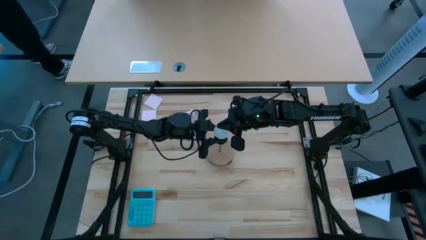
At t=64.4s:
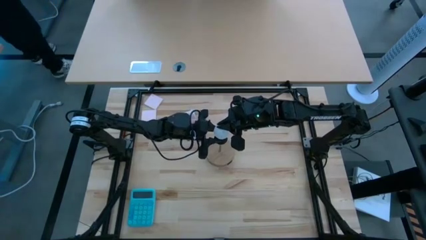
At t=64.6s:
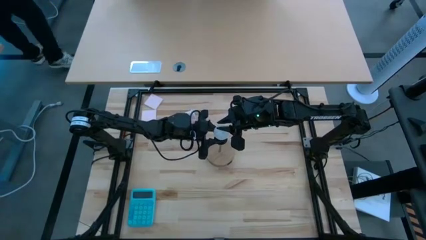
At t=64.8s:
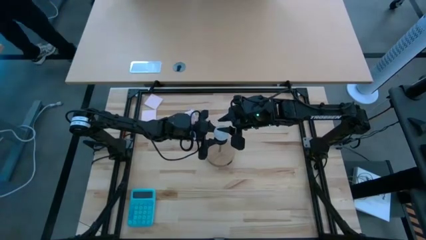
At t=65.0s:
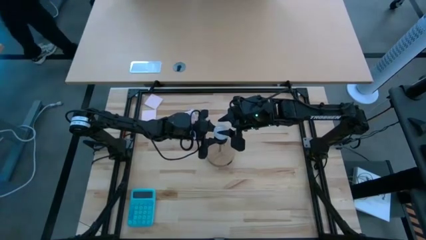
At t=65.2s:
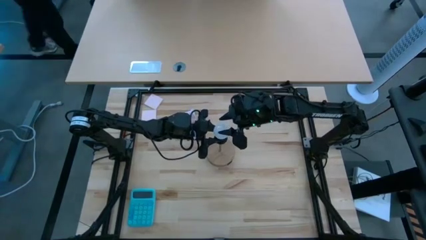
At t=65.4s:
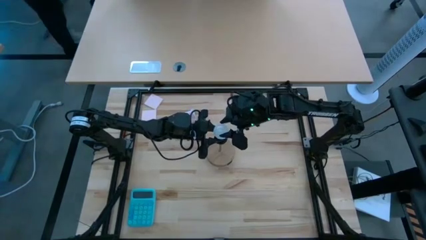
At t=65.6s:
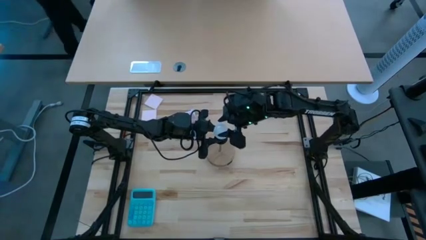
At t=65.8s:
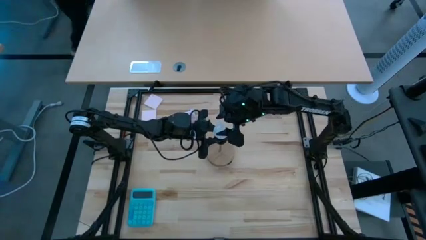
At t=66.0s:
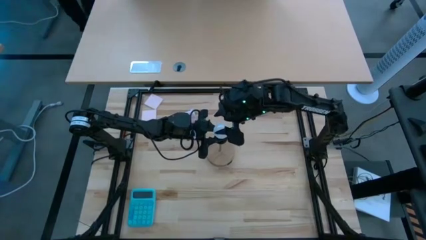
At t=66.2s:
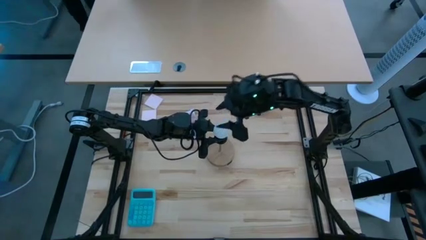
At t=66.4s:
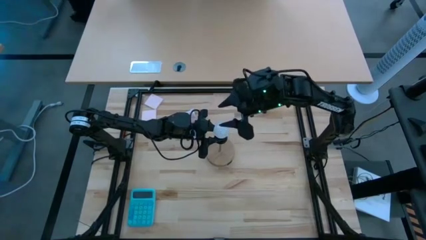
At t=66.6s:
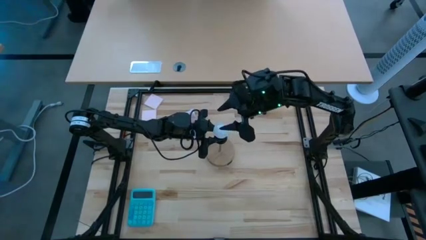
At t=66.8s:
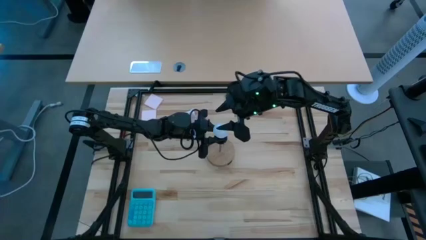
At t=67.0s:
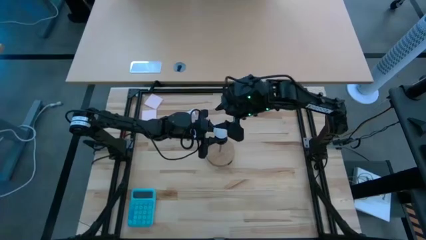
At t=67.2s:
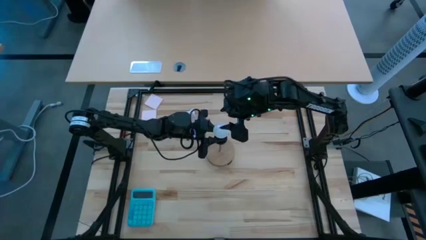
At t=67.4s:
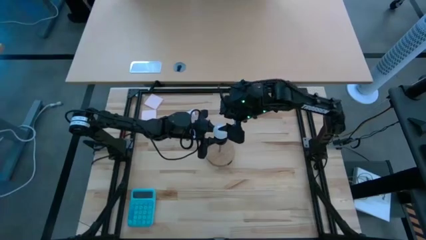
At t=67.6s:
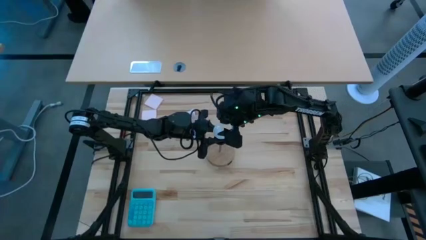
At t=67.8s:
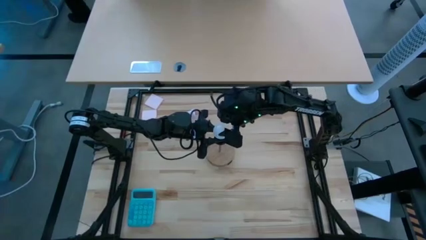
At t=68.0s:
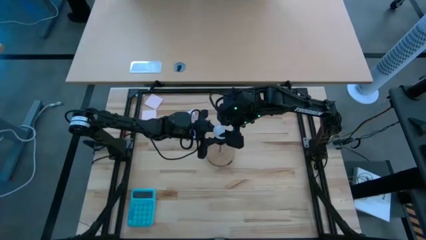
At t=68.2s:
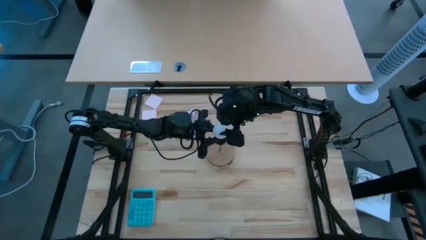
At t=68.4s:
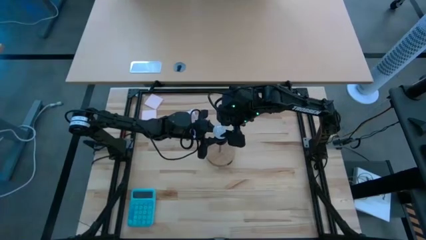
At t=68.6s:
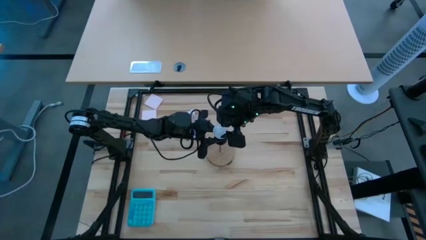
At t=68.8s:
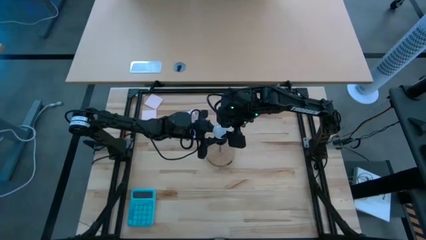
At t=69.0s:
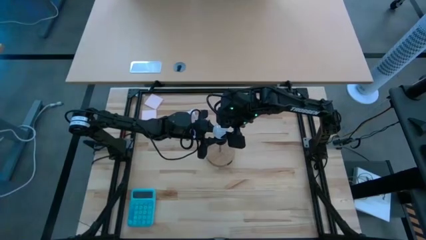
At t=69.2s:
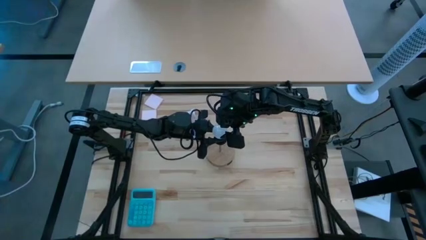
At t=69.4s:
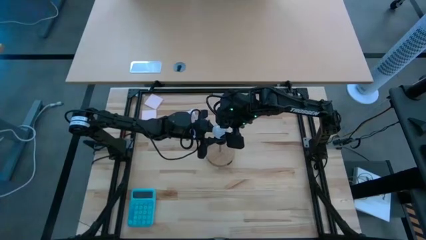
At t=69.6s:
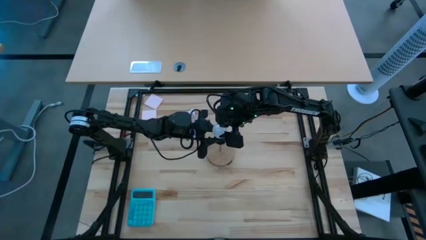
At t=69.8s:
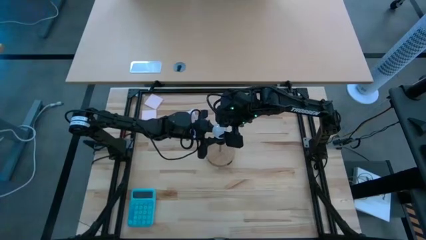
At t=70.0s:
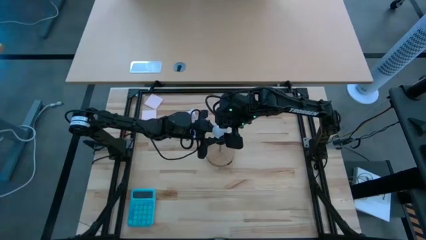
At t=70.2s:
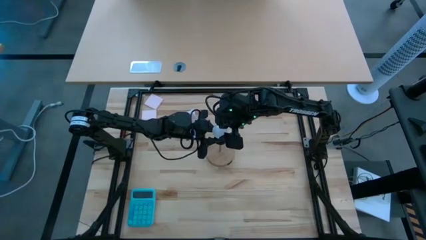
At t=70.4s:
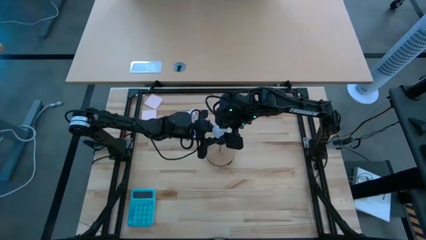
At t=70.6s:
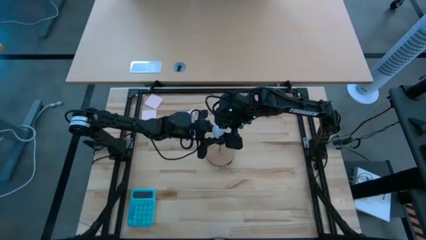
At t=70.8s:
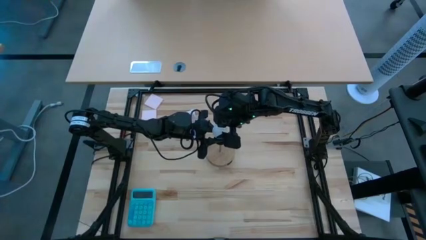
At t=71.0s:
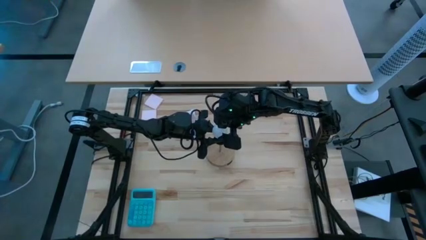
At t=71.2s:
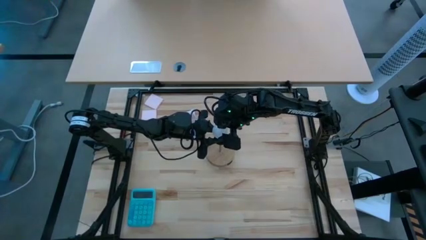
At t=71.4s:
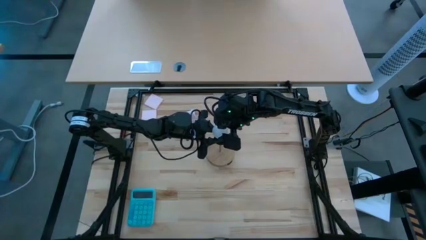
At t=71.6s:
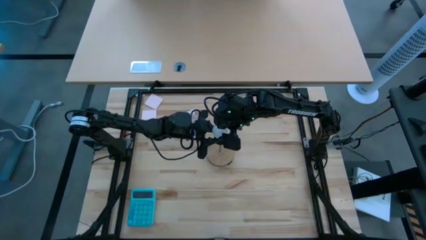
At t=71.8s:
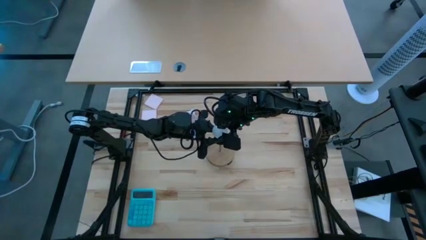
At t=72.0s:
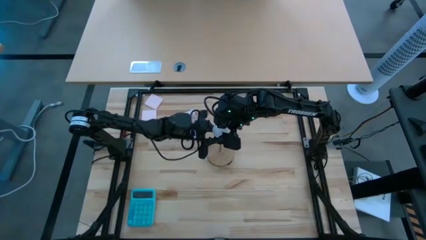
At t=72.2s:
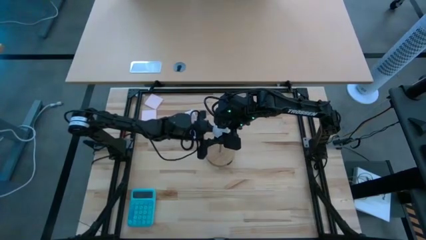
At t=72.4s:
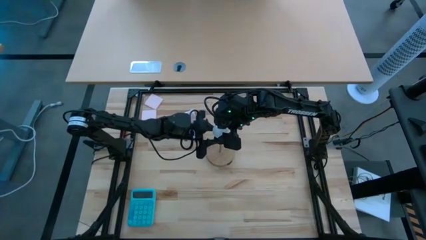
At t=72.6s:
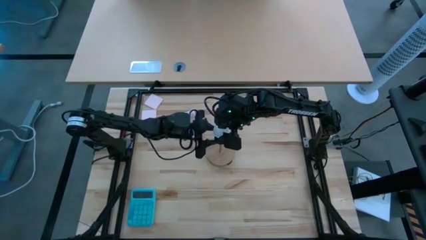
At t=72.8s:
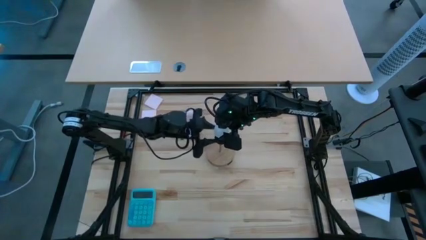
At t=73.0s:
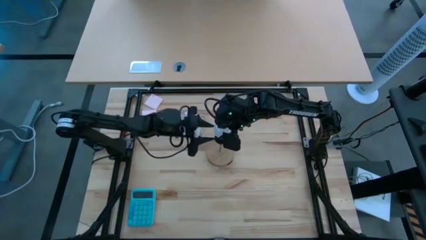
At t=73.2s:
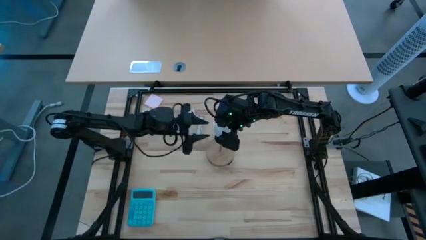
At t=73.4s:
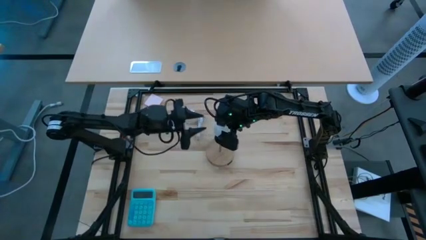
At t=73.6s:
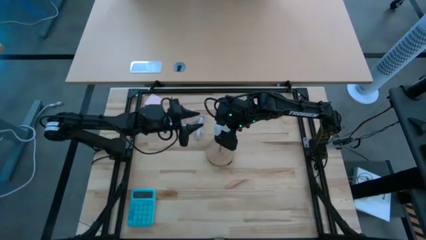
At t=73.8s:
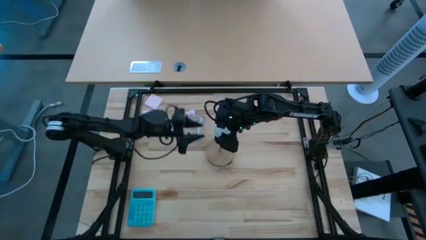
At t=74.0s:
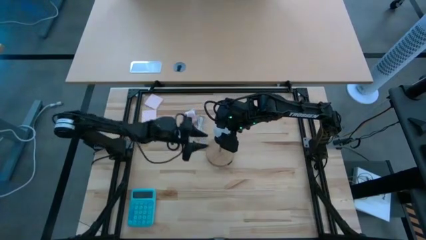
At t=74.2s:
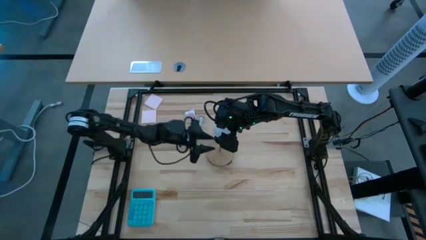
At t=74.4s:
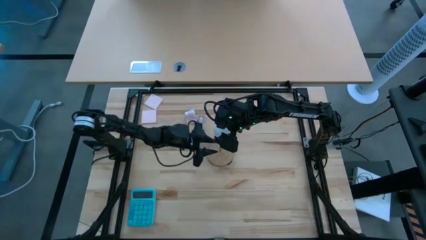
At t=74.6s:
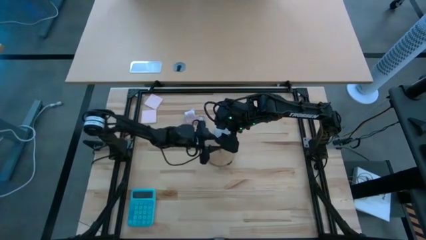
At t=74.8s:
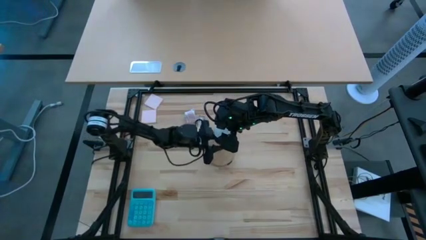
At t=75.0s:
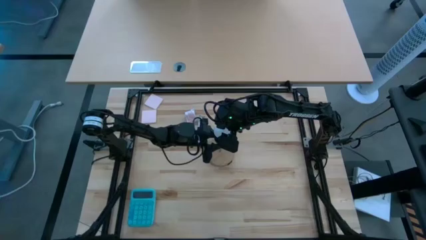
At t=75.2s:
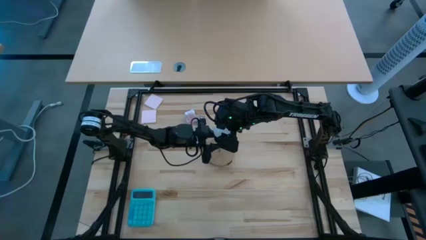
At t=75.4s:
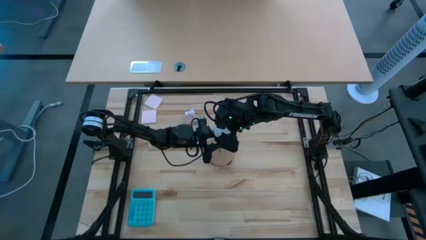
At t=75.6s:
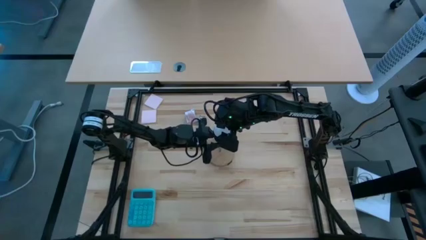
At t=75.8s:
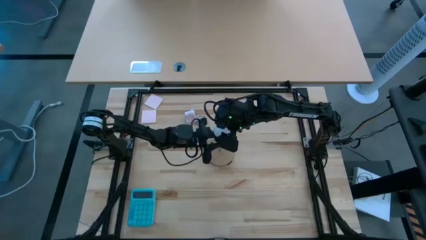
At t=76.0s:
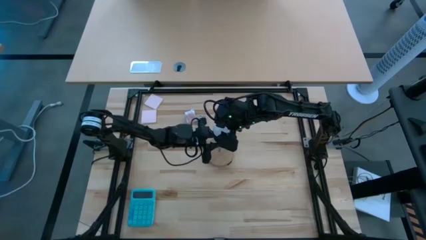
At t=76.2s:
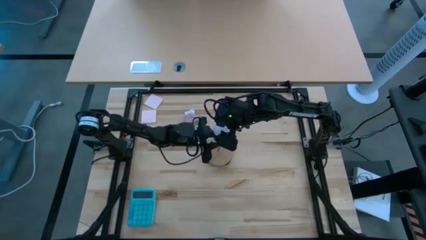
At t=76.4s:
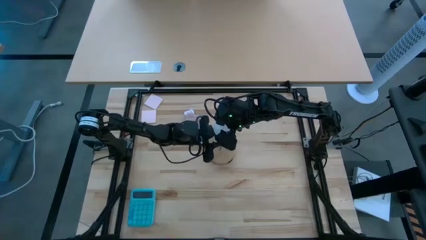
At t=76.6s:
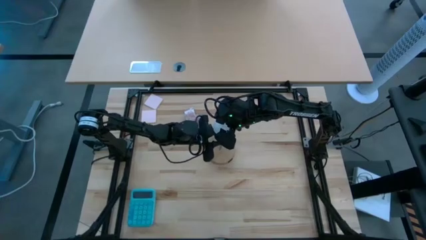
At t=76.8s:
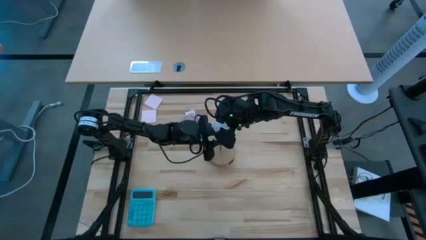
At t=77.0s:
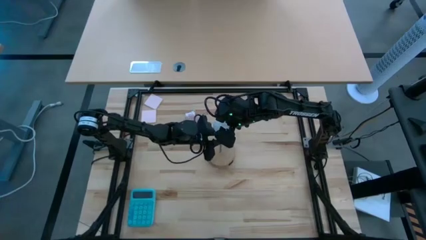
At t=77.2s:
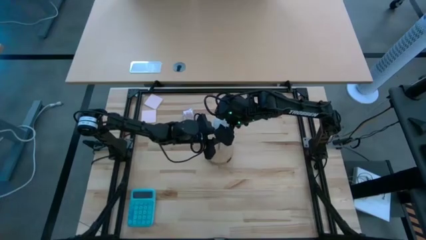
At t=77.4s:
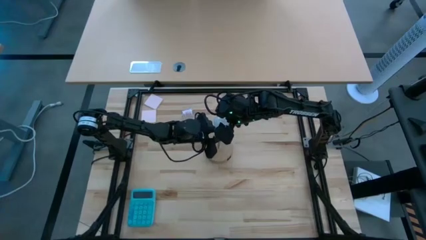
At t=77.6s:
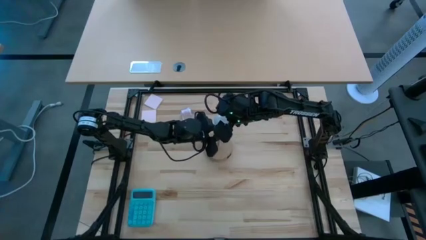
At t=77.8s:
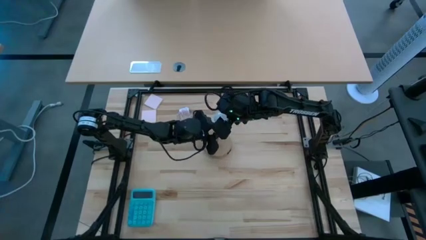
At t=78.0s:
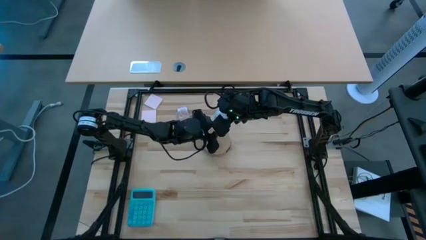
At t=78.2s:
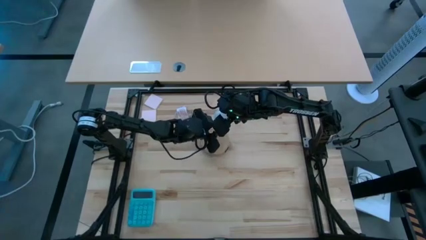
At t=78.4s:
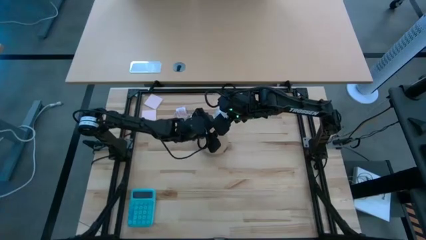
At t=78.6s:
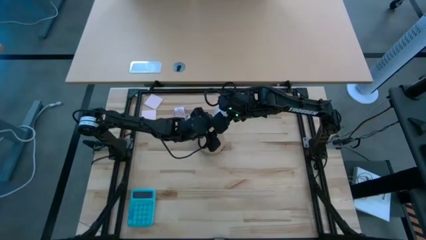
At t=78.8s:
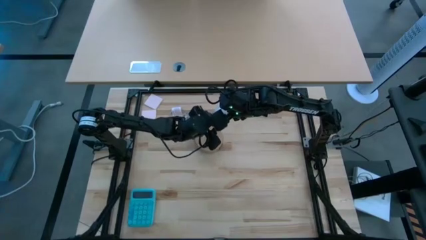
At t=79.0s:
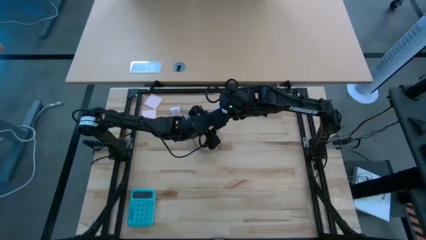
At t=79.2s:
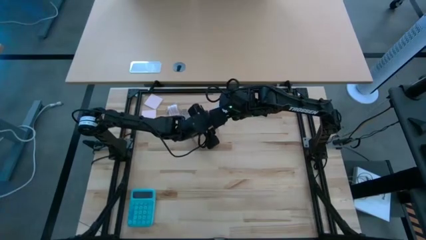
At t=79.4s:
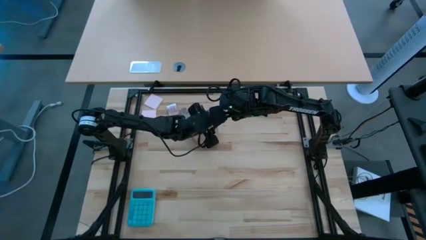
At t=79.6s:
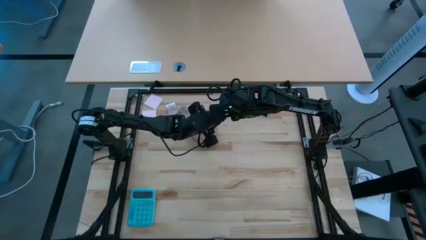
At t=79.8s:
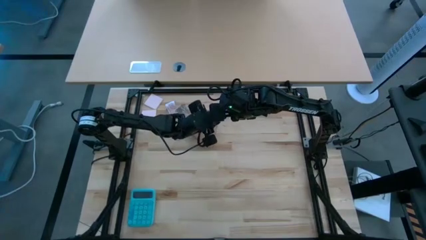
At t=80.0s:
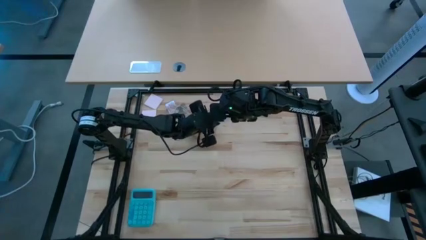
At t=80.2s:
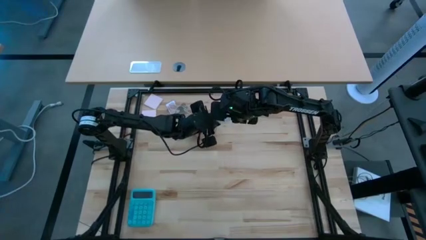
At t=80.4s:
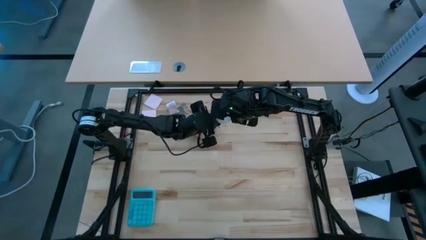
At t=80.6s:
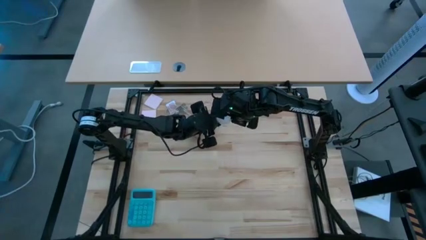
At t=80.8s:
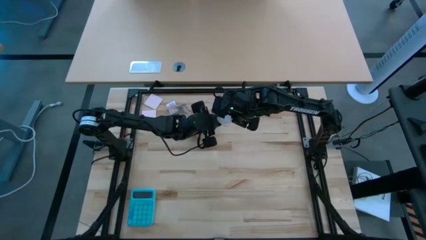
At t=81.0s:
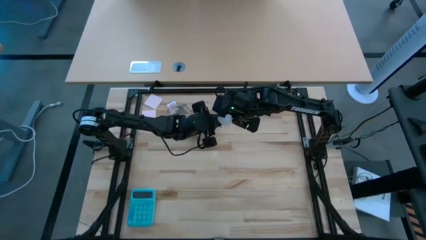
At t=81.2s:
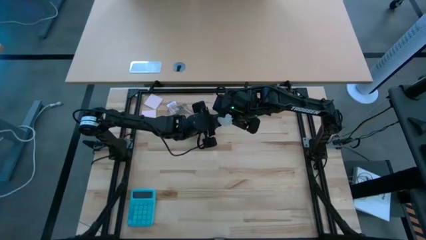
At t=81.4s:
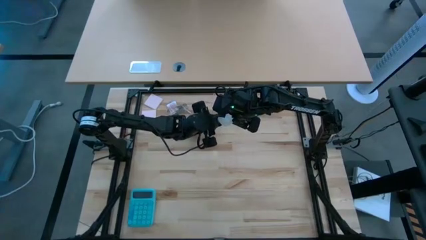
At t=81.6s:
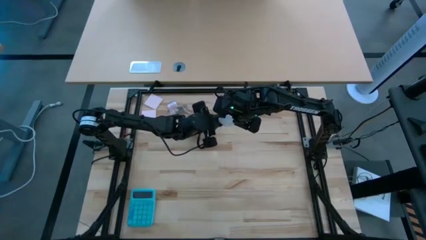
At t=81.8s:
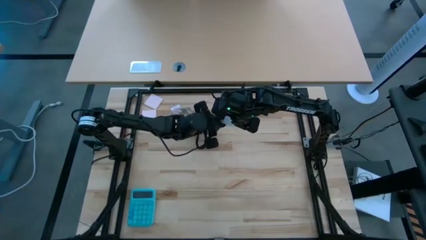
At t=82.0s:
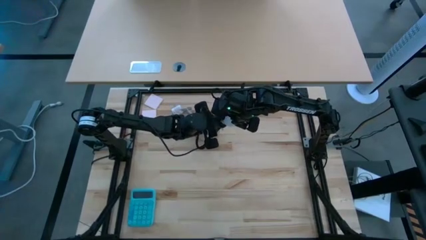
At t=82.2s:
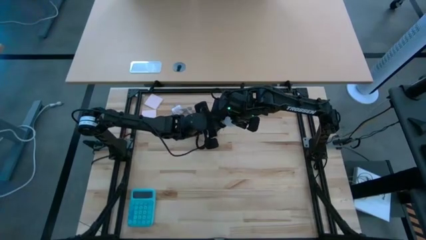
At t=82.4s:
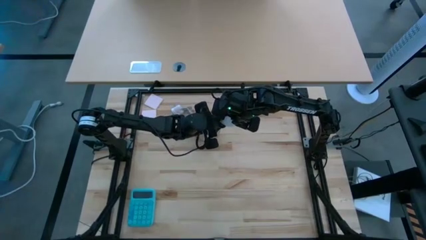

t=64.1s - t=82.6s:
Task: Screw lightbulb
Insert the lightbulb into the lamp
